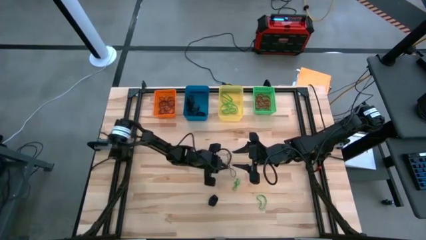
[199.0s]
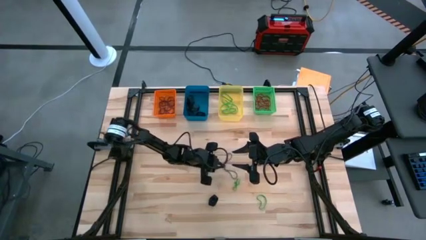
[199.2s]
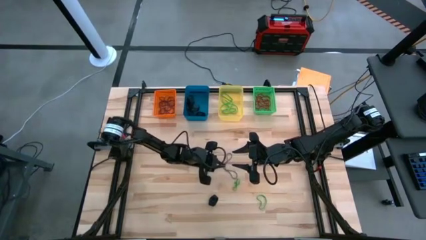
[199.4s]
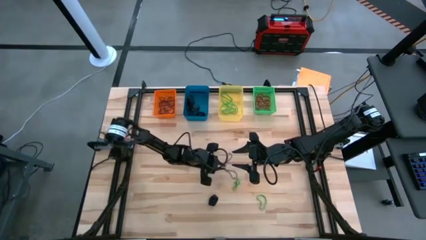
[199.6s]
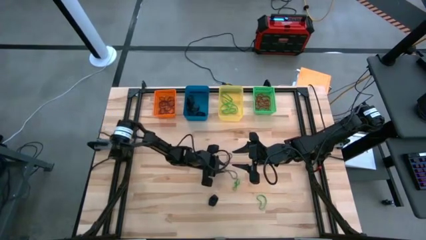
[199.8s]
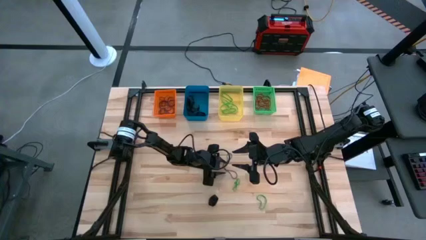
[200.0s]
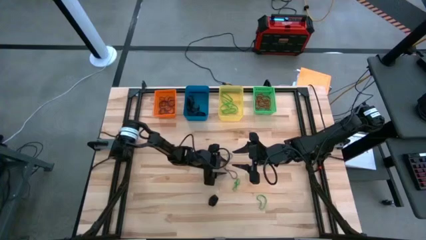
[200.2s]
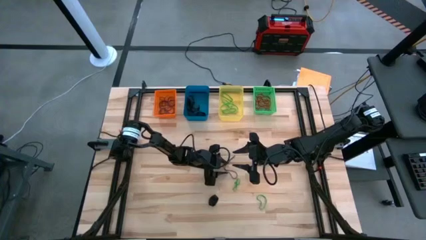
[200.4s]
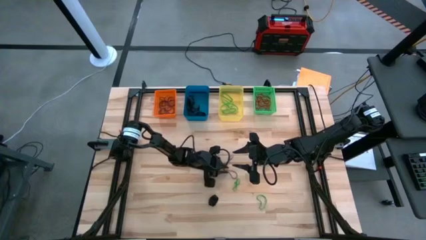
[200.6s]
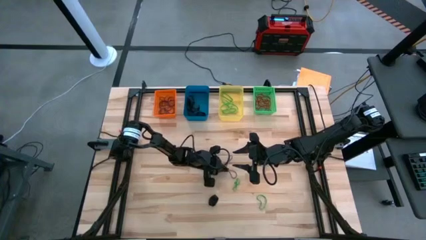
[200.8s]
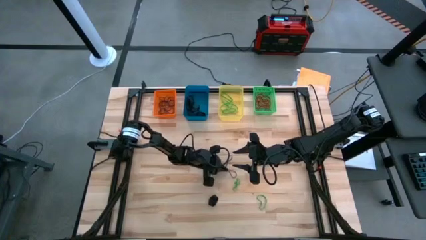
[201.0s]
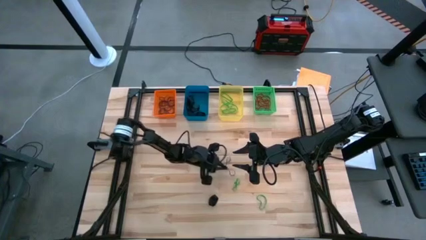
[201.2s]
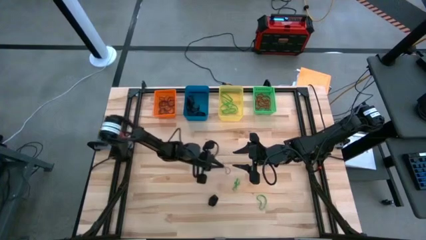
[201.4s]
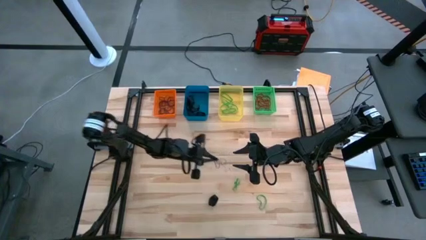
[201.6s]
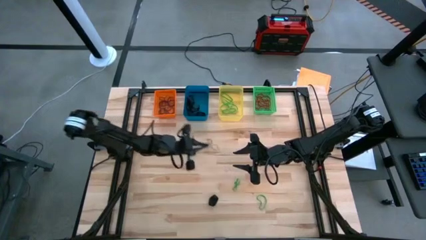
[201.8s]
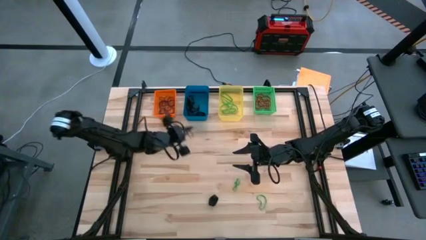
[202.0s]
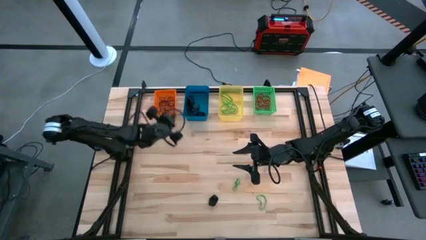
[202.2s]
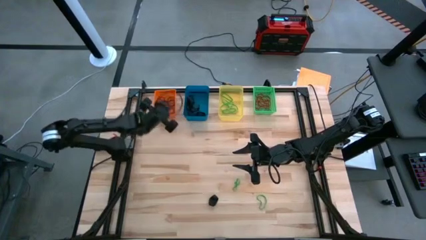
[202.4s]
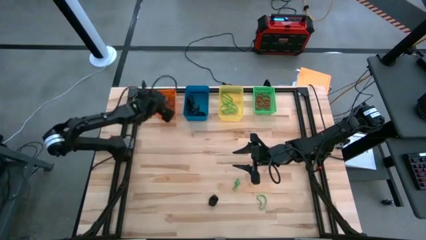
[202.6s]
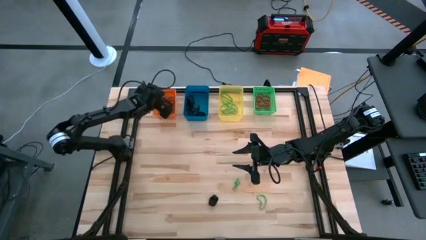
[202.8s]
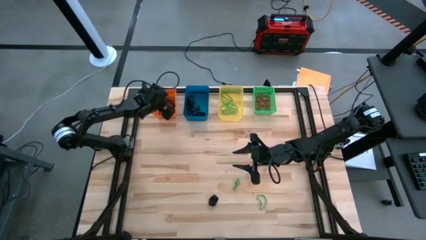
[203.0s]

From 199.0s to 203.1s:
Task: Sort rubber bands into baskets
Put the violet rubber band into the orange bin

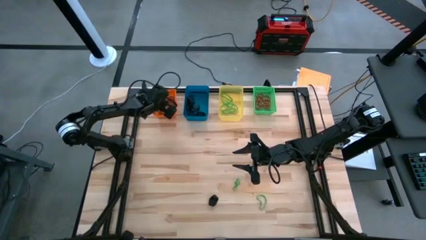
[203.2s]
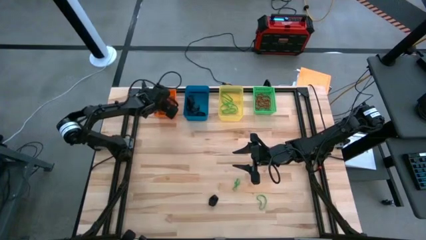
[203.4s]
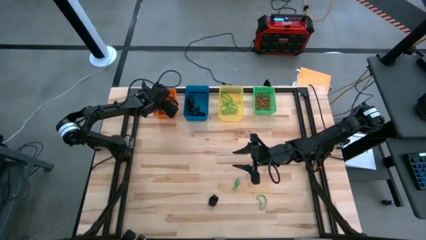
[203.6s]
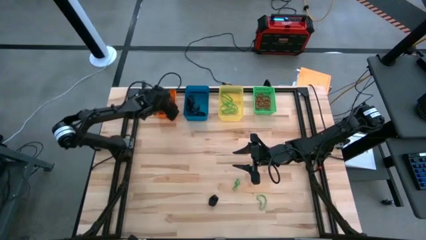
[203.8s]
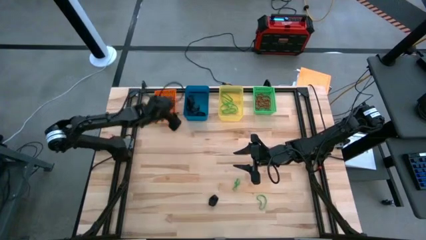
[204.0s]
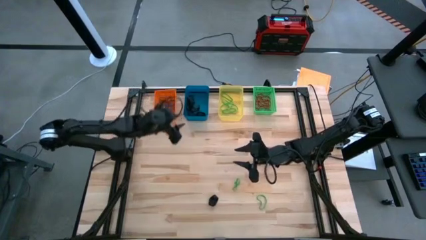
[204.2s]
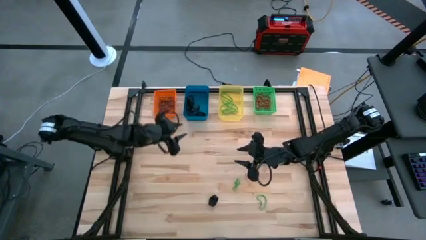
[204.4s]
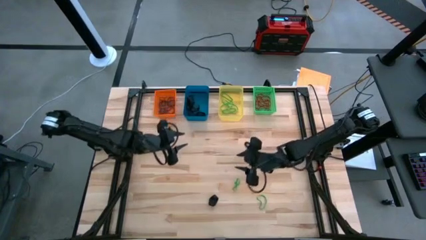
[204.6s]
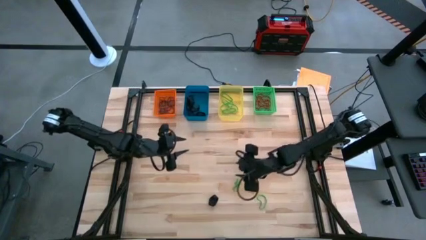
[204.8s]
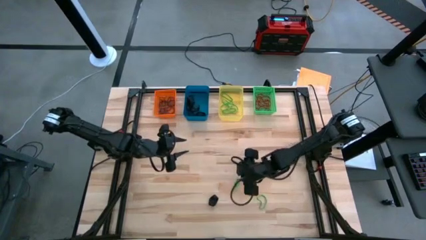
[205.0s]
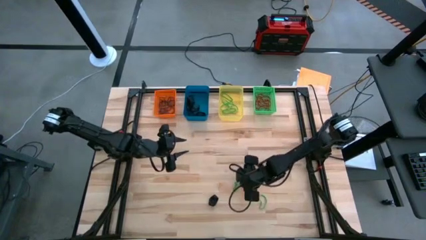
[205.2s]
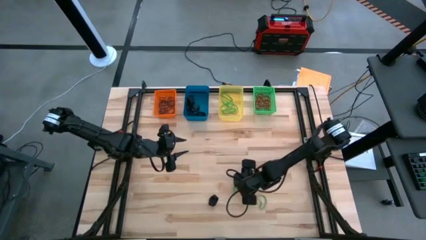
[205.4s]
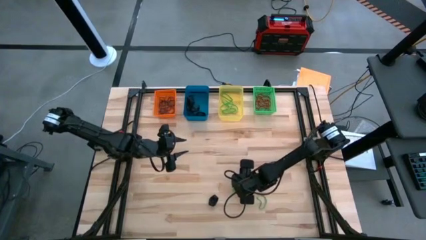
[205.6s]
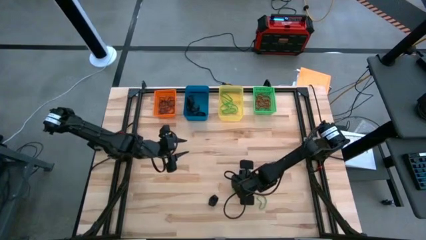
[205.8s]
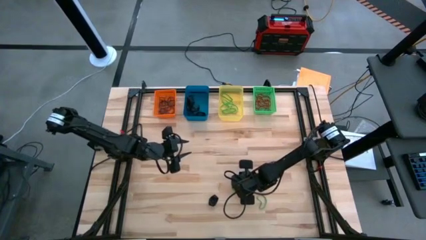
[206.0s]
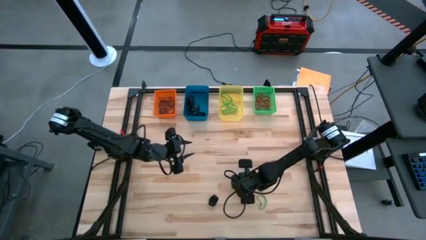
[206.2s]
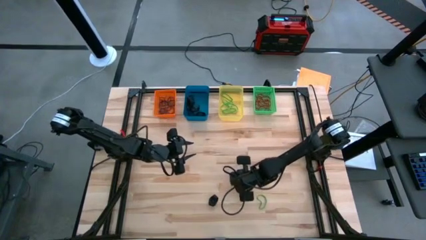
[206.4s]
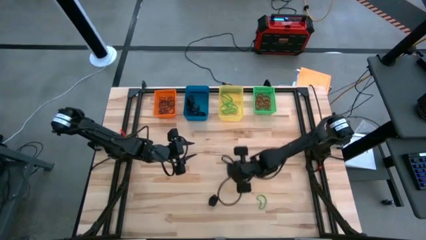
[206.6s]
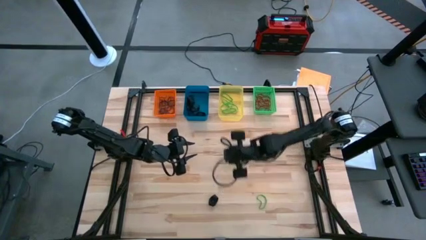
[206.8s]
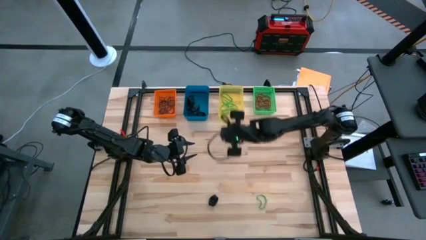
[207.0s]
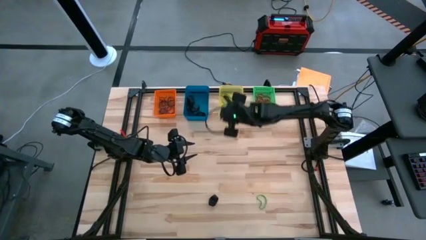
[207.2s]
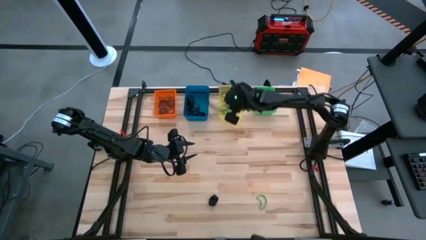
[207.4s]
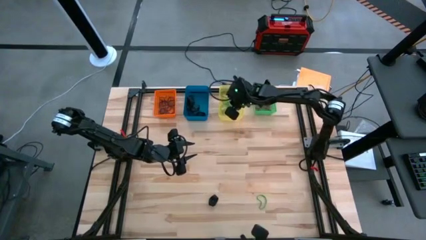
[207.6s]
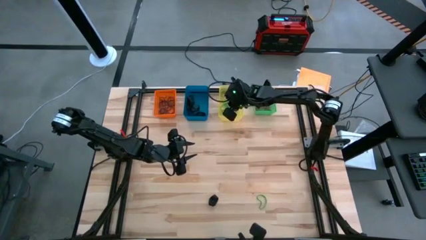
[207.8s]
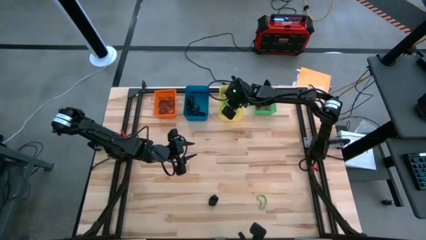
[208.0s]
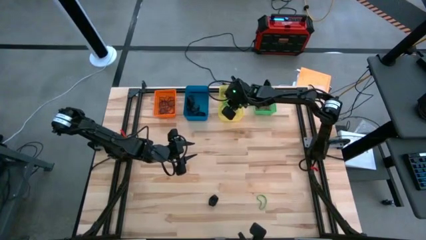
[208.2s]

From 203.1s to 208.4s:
Put the green rubber band into the yellow bin

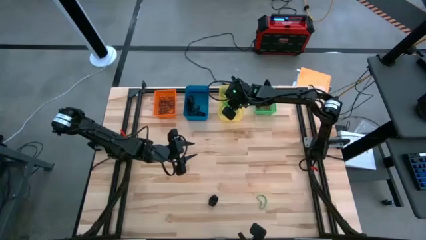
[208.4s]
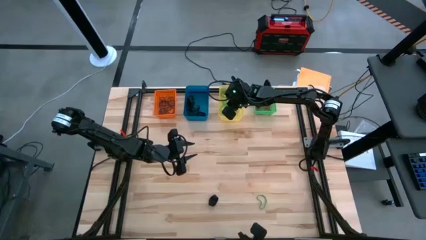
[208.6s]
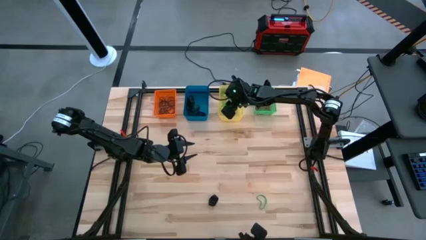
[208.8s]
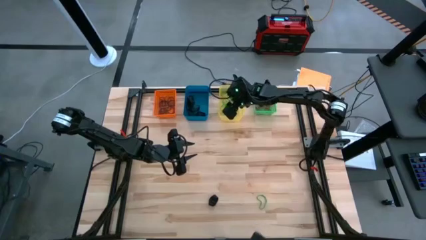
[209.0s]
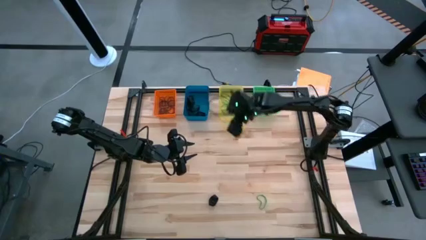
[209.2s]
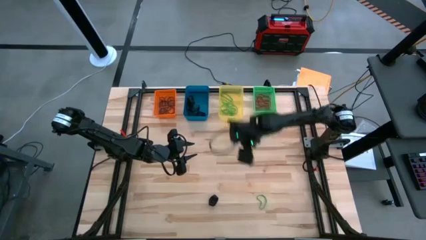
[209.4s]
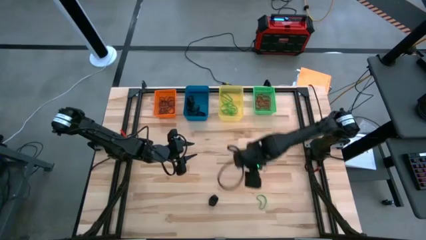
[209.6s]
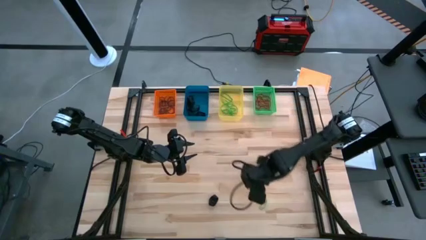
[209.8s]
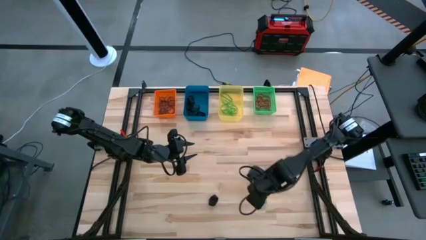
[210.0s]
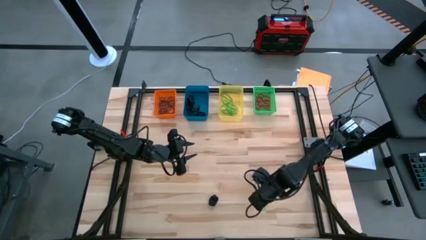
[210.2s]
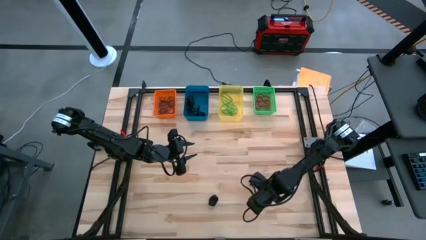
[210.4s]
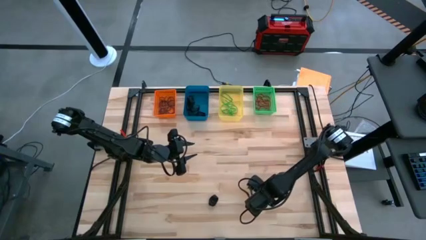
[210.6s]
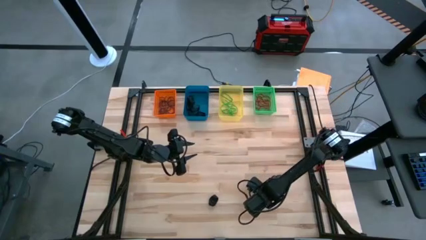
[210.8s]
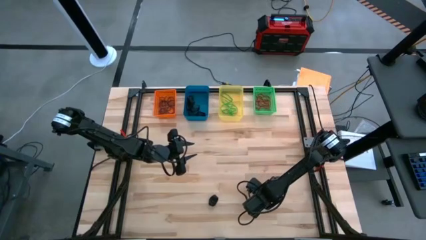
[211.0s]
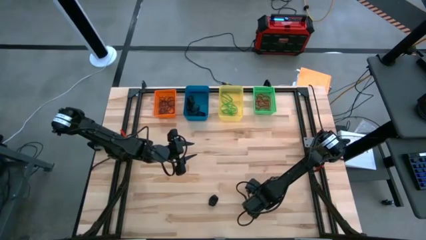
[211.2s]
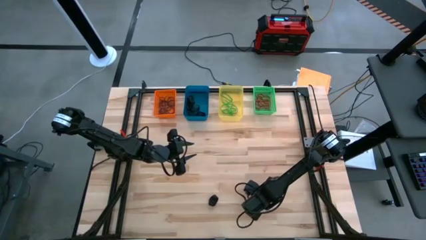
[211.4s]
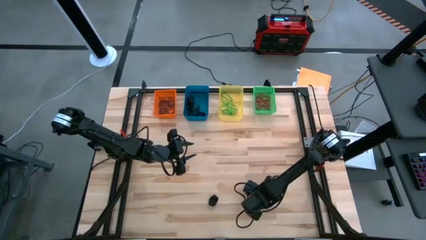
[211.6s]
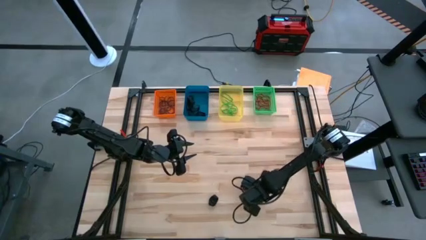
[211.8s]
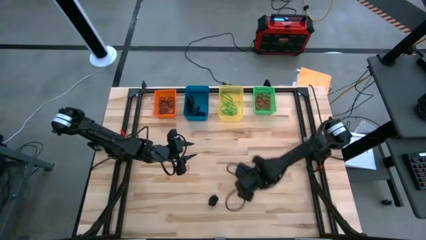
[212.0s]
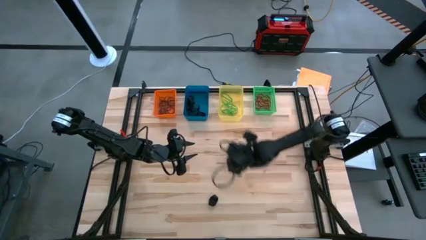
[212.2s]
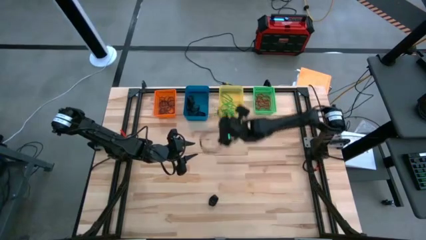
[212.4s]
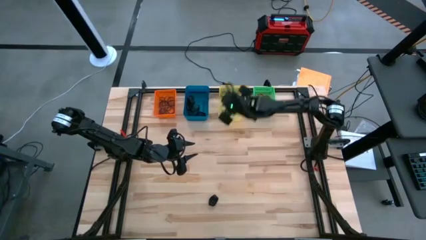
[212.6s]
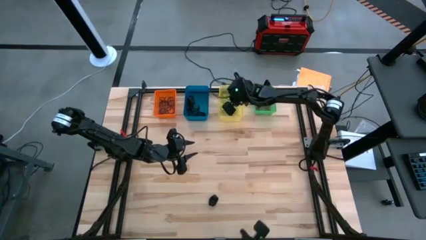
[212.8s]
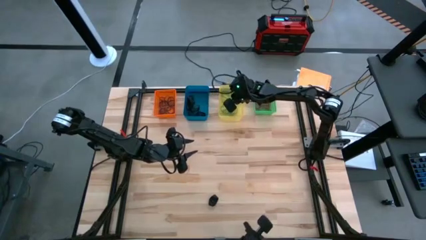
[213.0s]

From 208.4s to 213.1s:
Put the green rubber band into the yellow bin

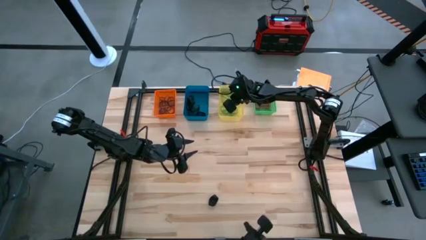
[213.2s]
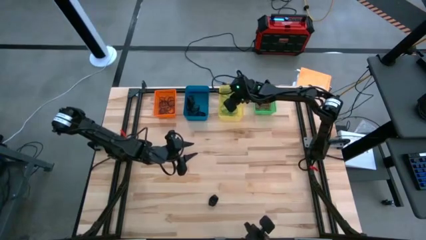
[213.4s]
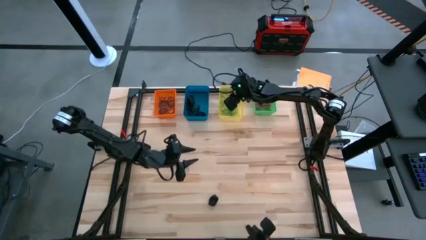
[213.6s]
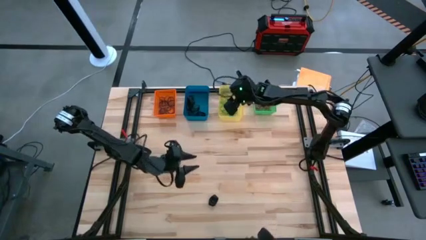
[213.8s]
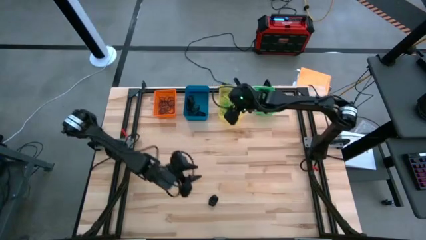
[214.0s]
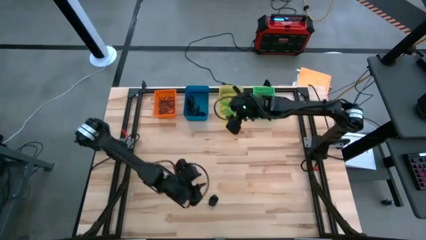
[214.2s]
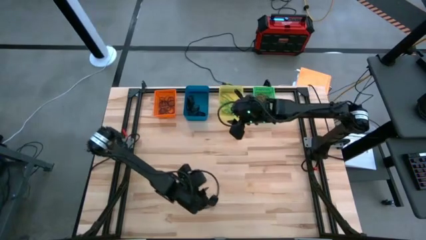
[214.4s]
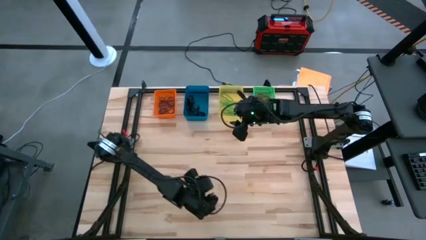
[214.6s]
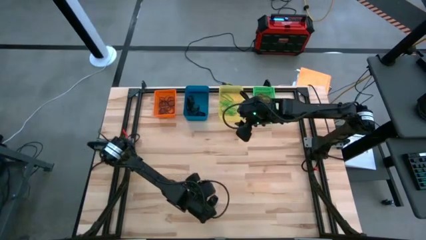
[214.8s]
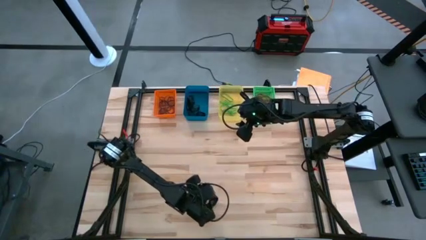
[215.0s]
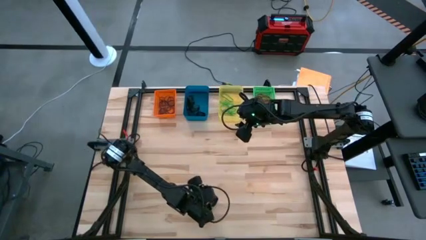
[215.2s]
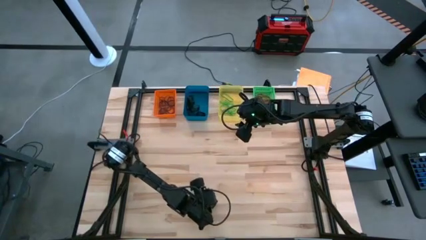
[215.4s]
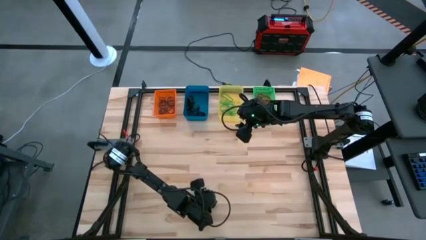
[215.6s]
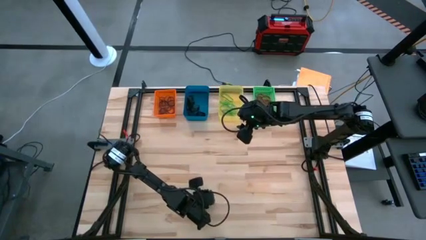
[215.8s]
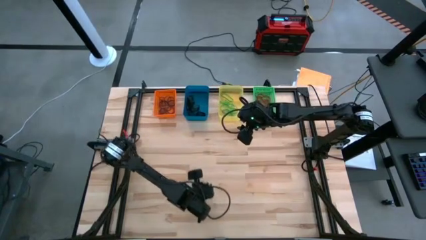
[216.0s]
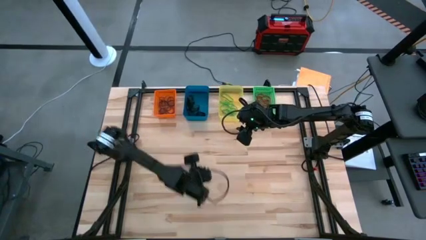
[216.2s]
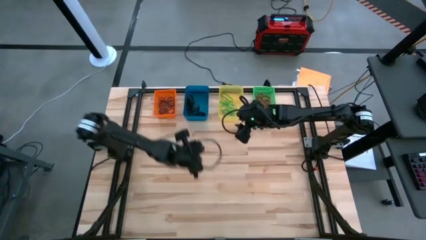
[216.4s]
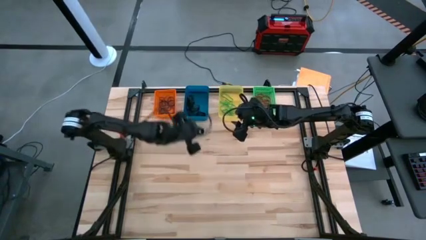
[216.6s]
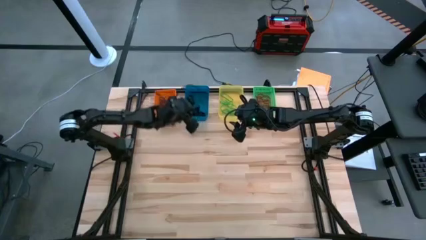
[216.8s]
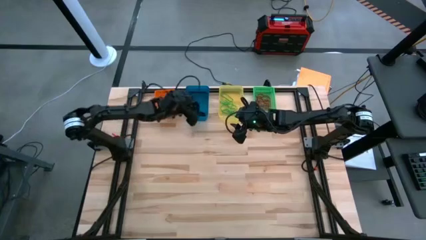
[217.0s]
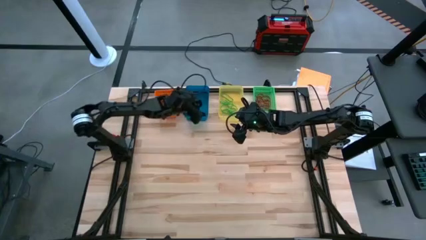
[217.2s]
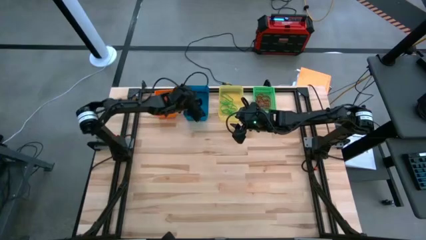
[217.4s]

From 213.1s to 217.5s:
Put the black rubber band into the blue bin
